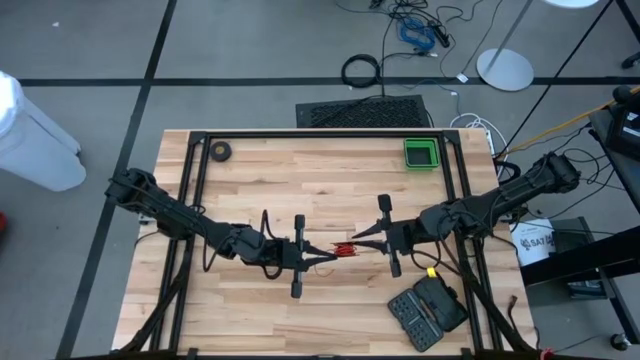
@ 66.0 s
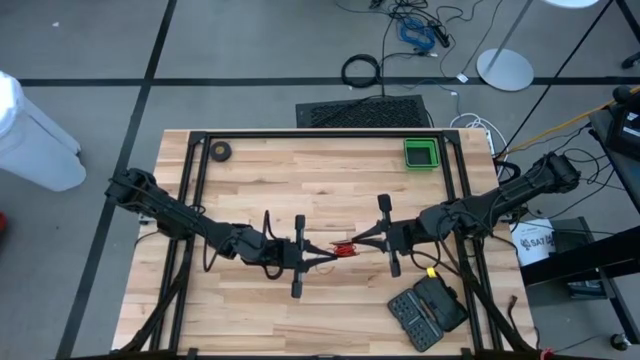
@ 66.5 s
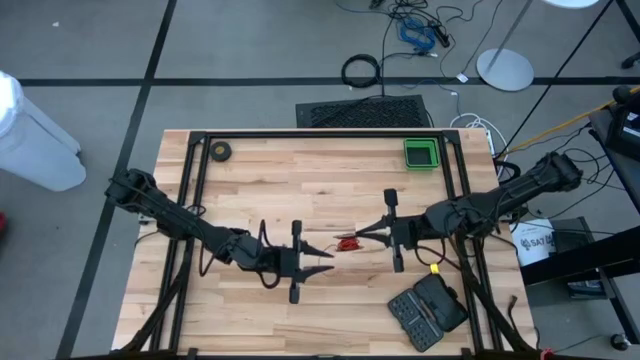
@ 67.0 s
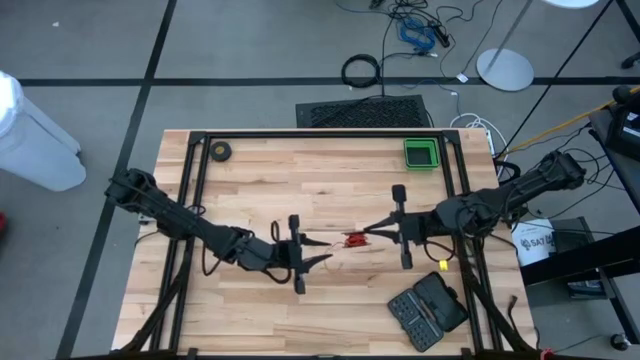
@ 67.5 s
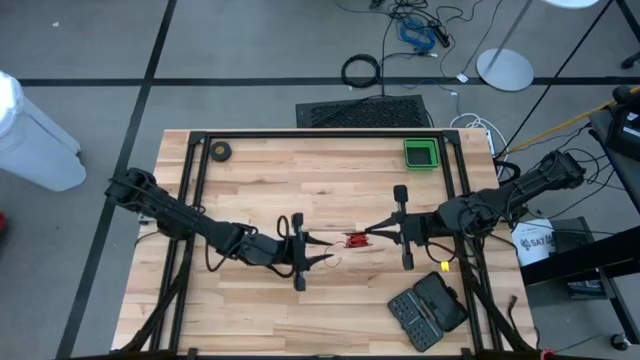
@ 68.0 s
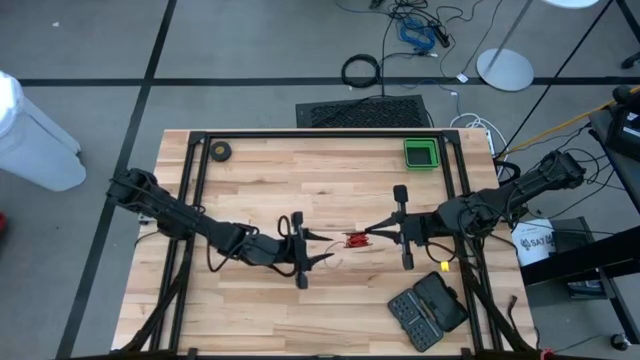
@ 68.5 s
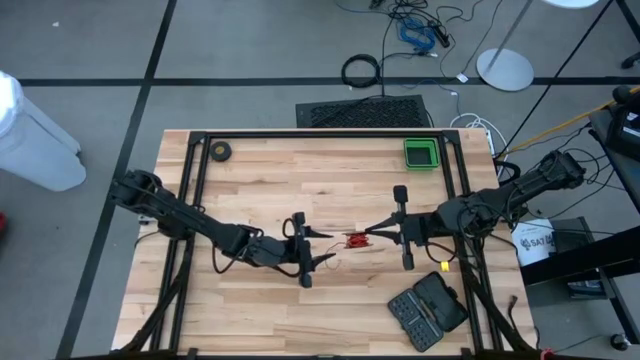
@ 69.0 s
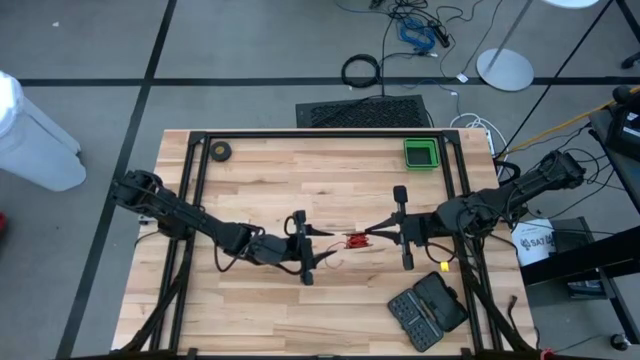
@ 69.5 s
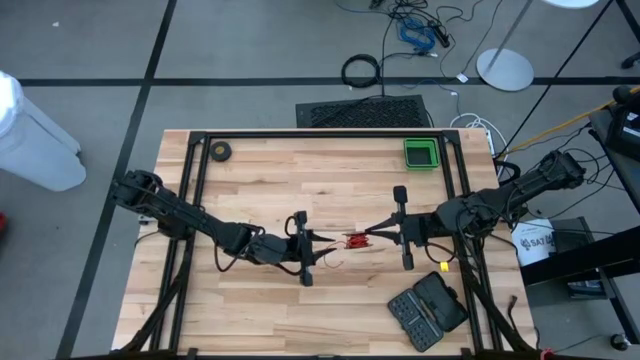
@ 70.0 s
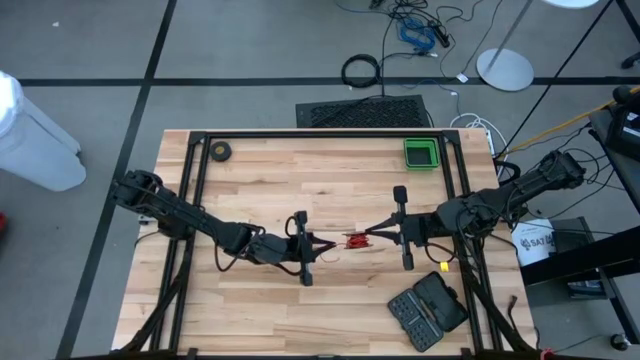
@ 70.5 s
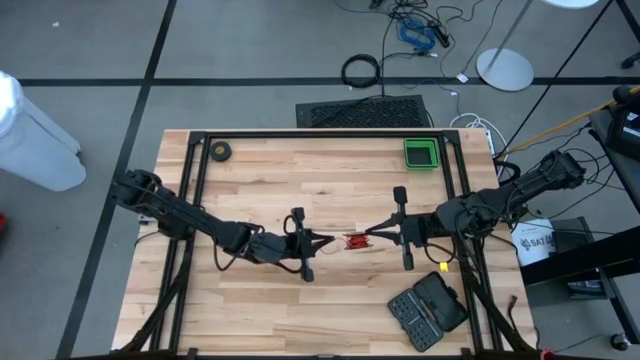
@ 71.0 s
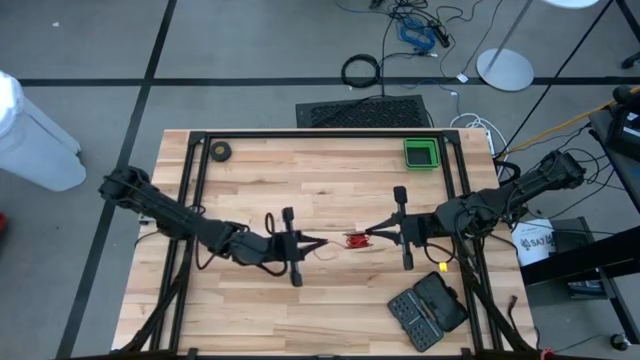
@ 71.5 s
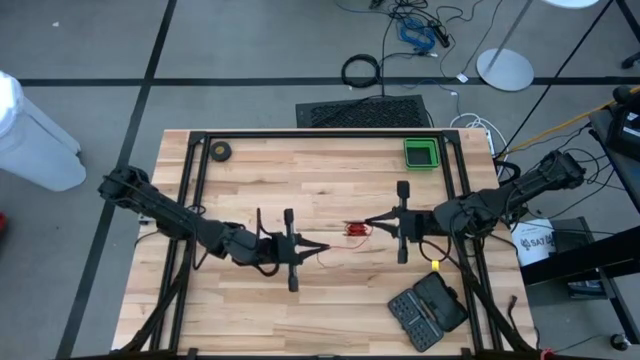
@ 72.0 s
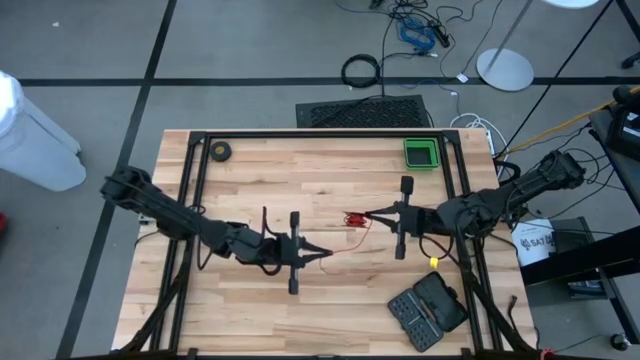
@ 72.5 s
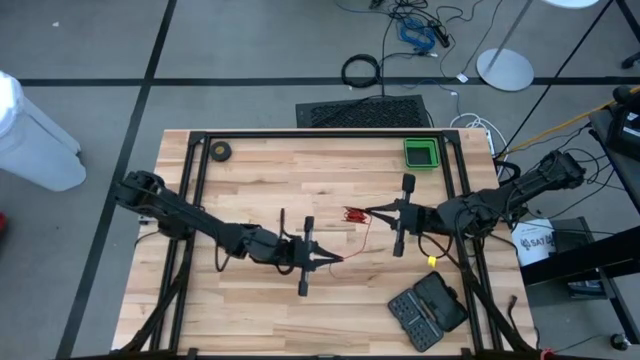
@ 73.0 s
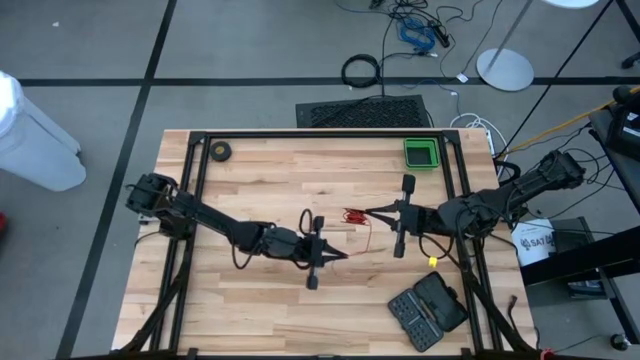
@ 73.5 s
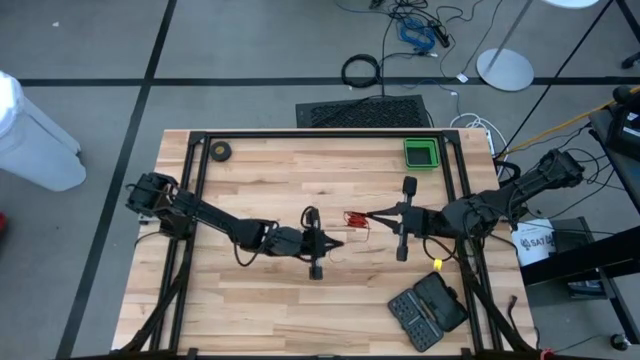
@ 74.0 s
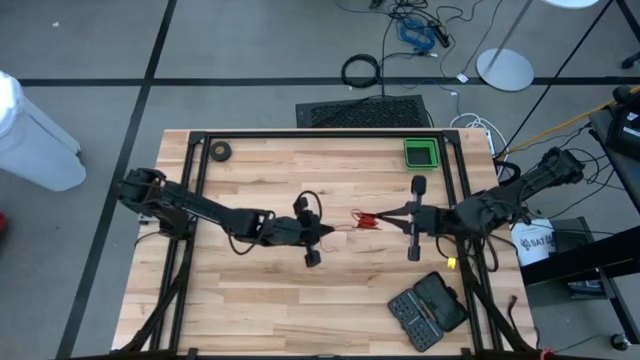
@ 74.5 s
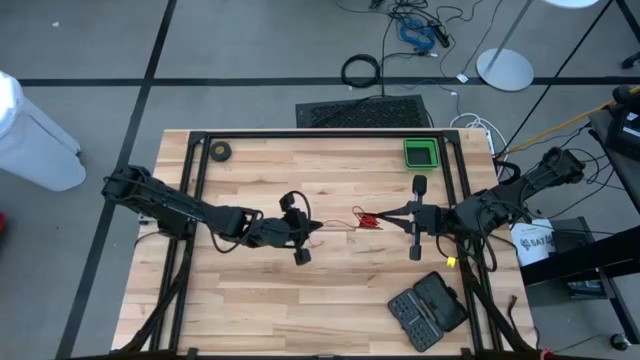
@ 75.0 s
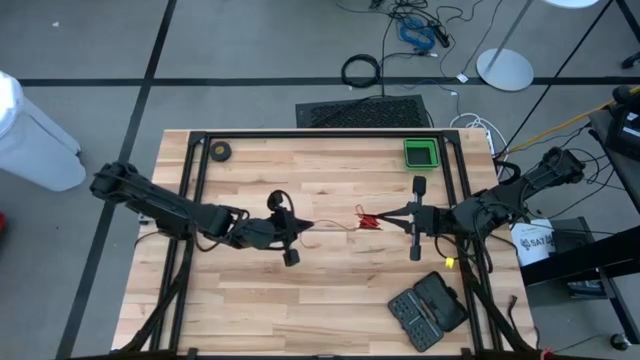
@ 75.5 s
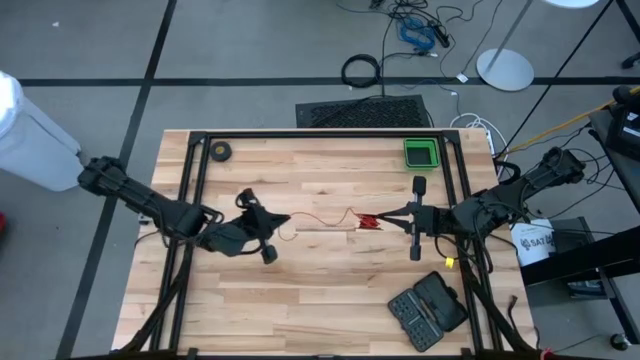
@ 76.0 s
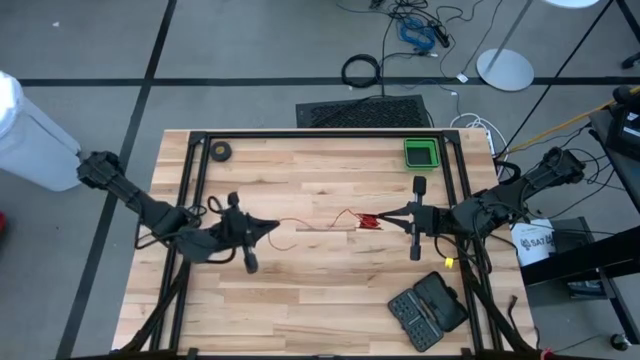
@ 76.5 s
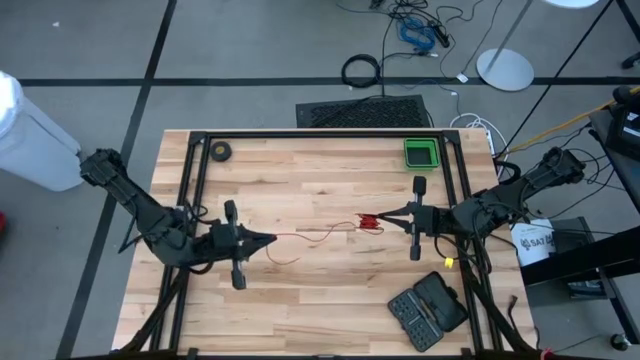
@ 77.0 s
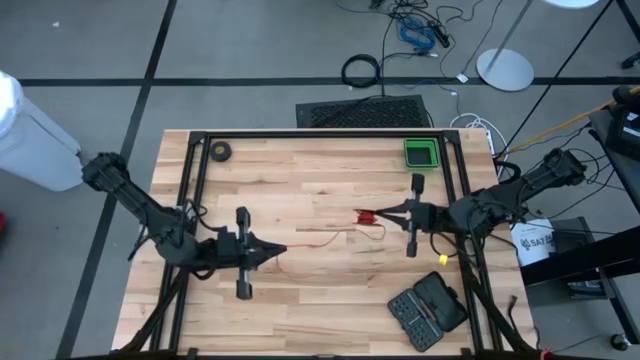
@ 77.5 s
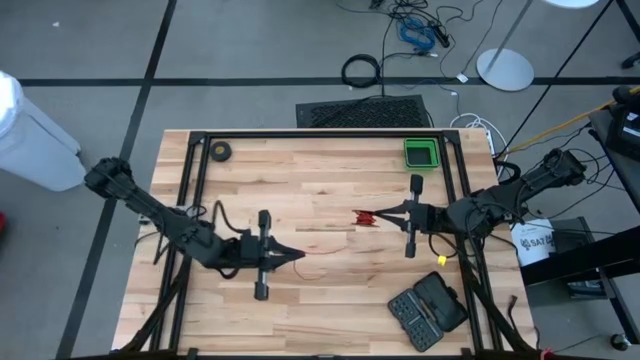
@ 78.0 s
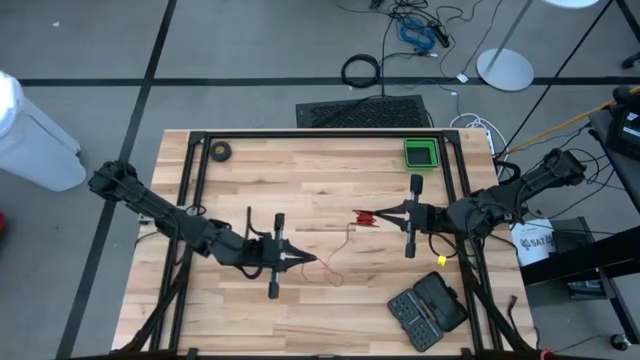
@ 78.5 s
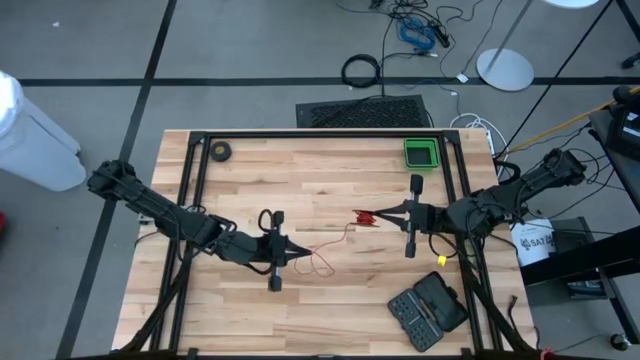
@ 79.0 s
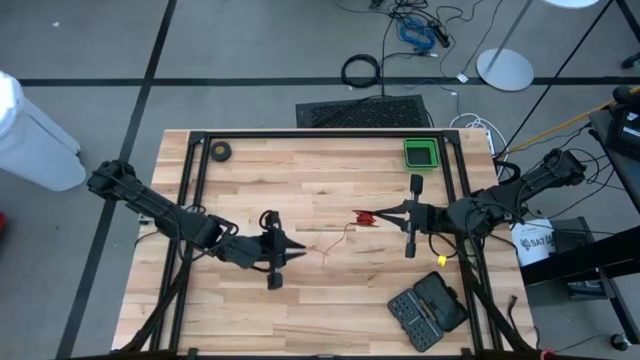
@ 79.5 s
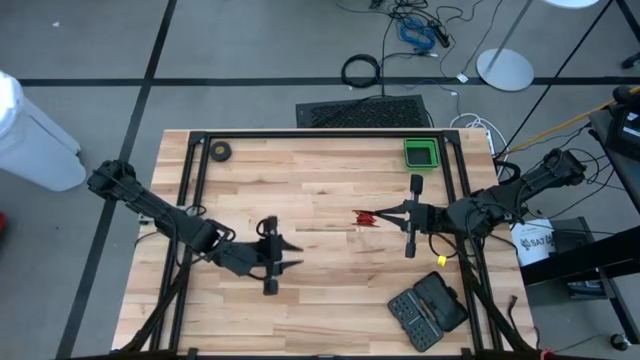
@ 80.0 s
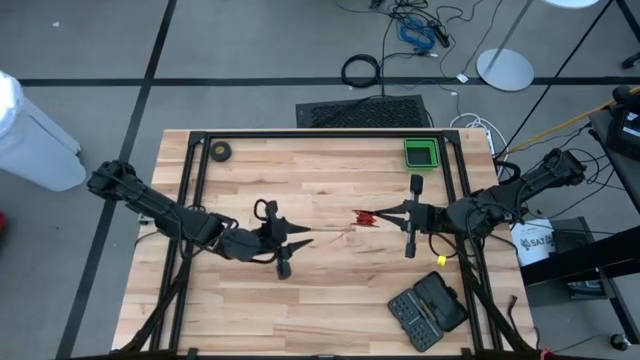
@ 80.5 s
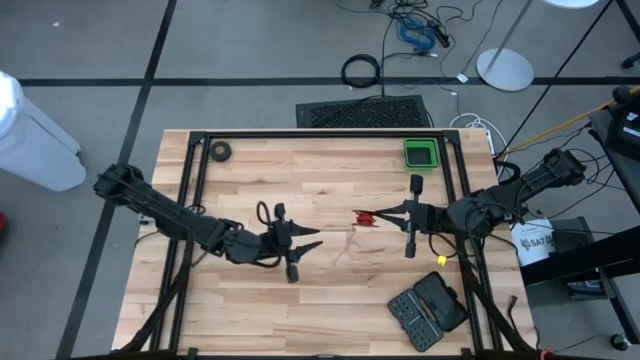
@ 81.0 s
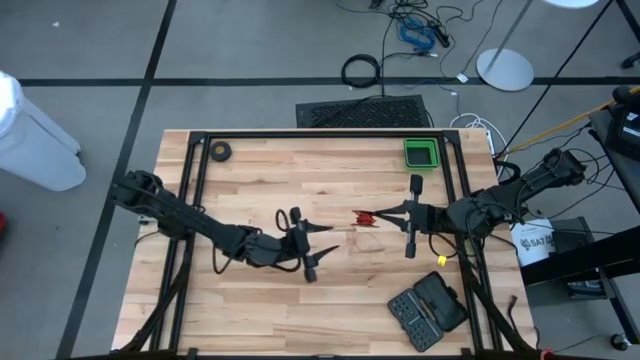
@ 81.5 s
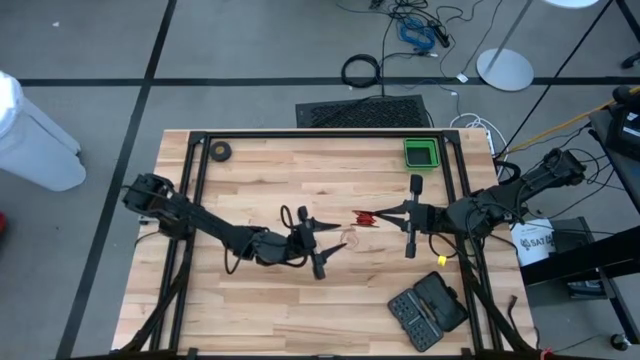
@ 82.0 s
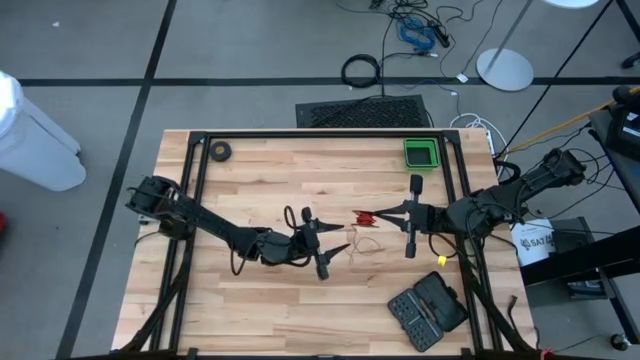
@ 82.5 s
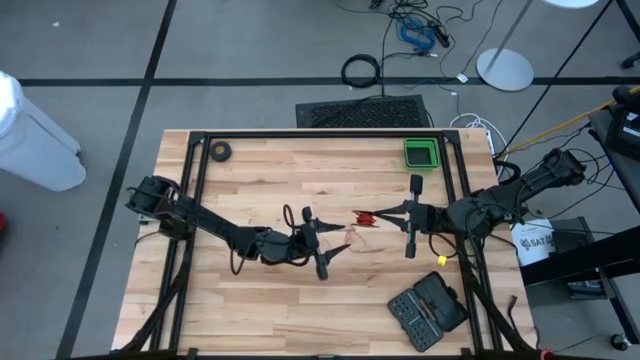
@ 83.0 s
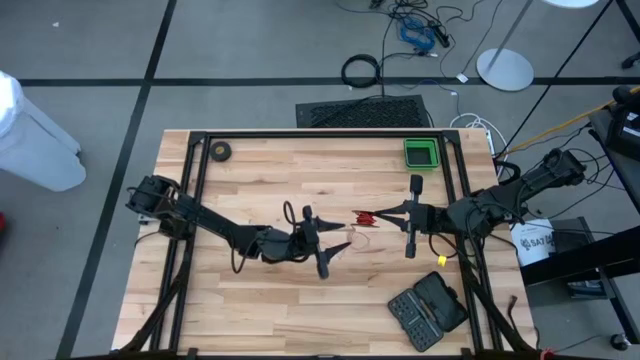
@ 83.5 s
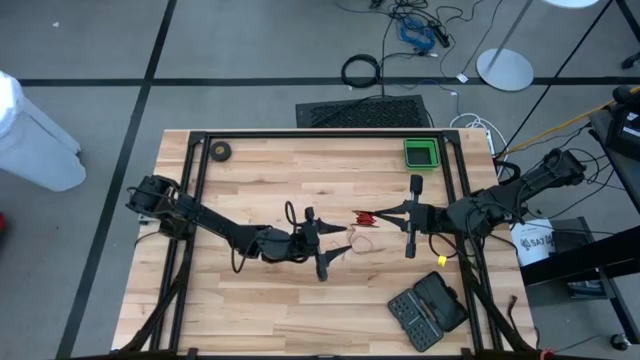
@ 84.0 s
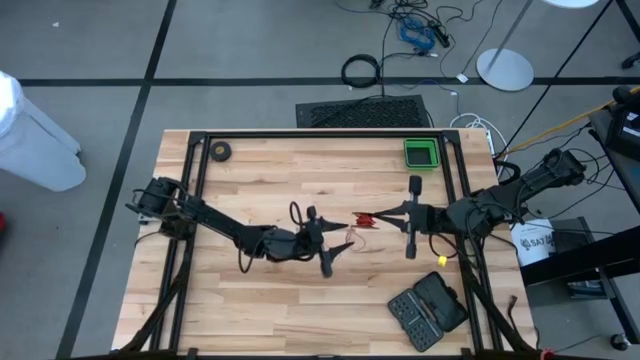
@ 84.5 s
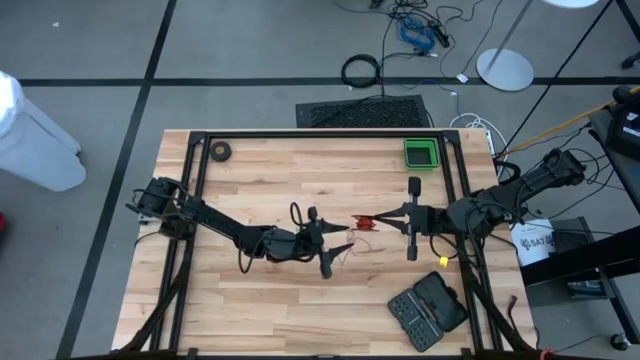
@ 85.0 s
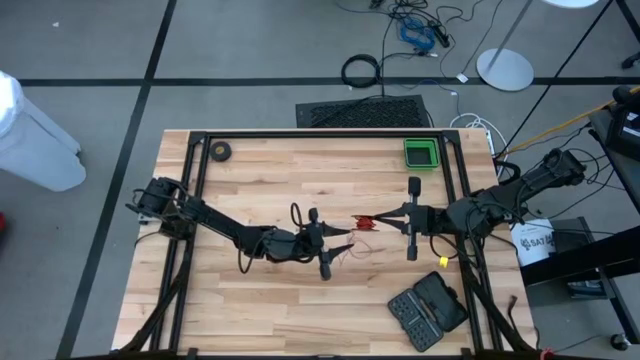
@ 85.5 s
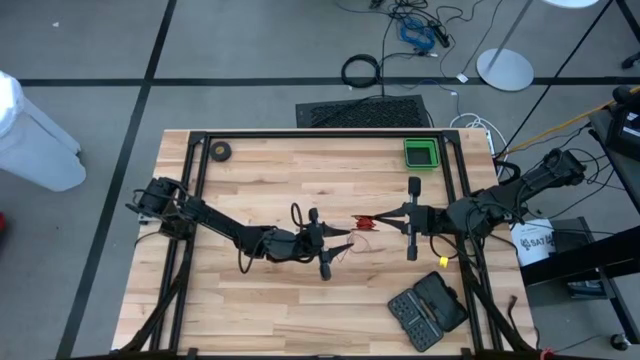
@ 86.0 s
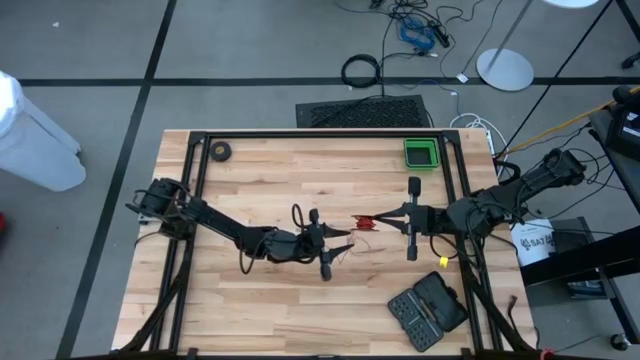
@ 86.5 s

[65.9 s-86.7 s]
Task: Coil cords
Uncoil the red wire from the spool
